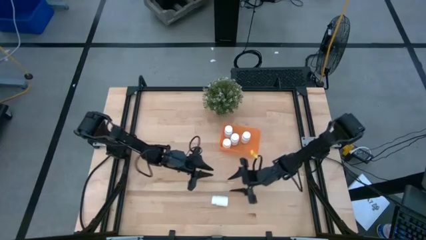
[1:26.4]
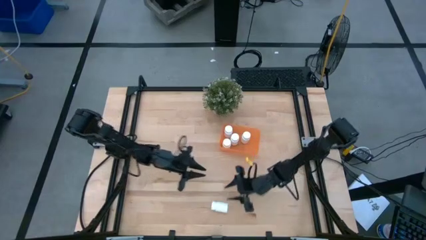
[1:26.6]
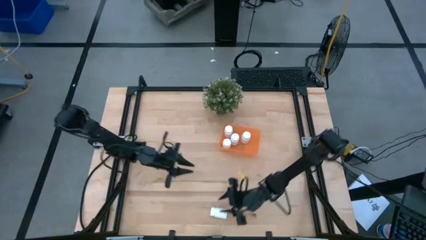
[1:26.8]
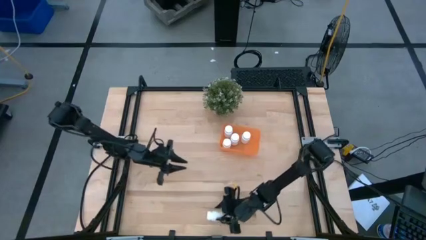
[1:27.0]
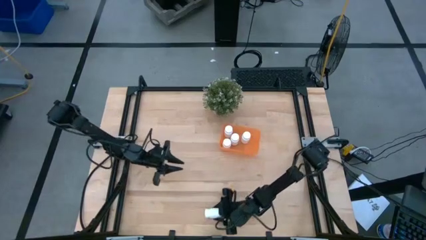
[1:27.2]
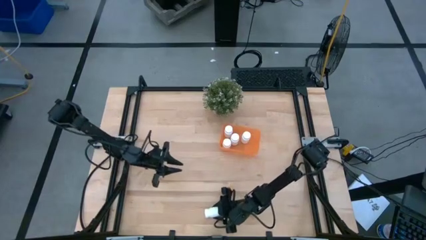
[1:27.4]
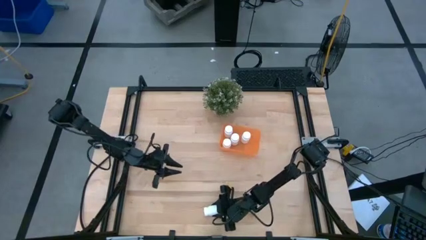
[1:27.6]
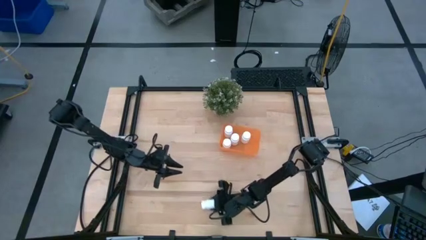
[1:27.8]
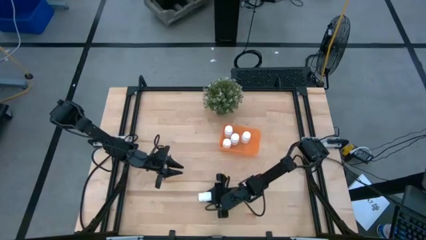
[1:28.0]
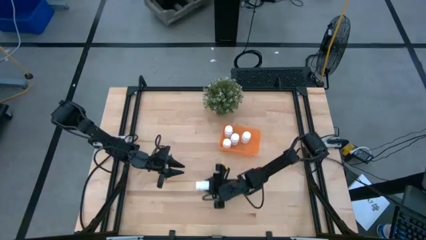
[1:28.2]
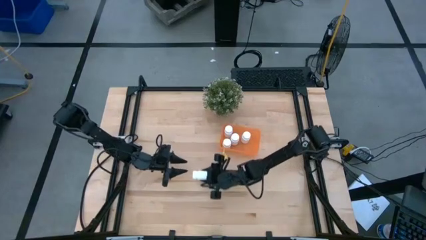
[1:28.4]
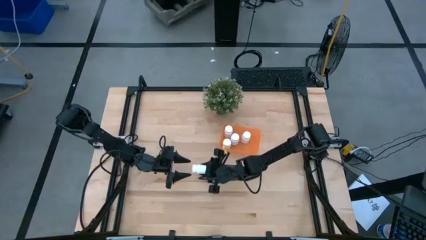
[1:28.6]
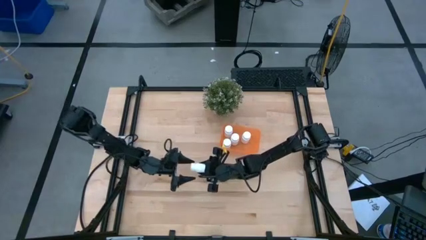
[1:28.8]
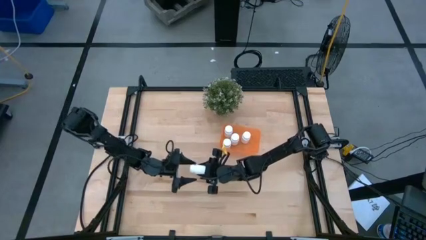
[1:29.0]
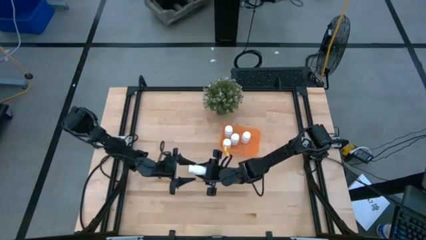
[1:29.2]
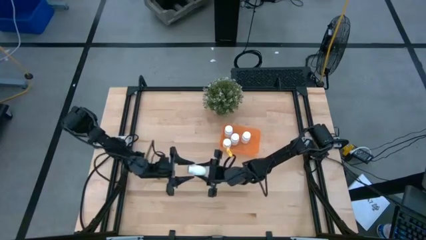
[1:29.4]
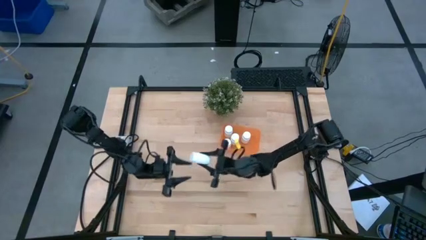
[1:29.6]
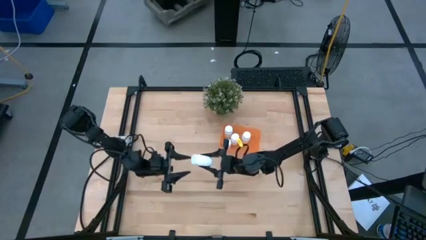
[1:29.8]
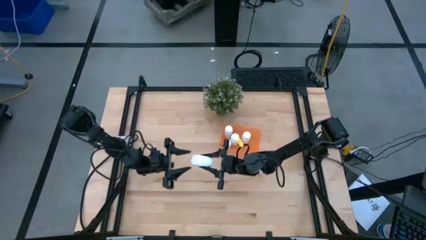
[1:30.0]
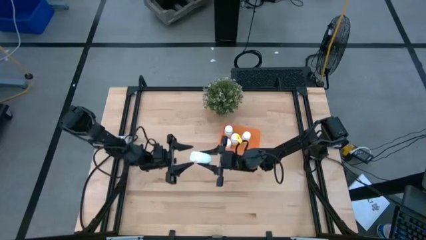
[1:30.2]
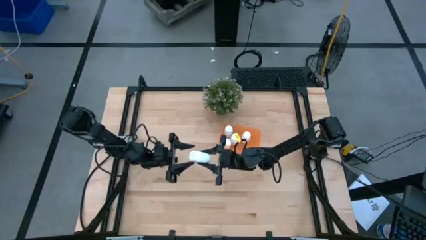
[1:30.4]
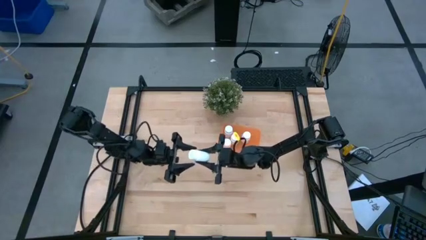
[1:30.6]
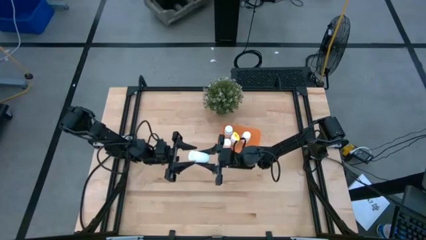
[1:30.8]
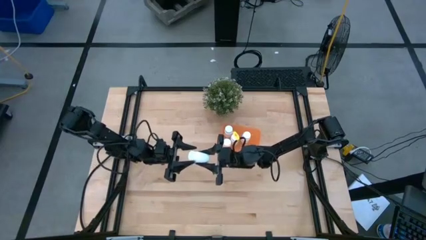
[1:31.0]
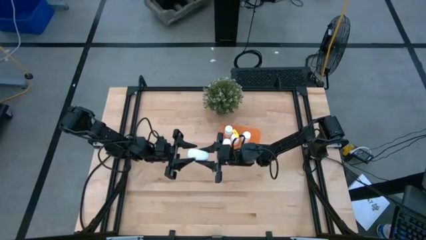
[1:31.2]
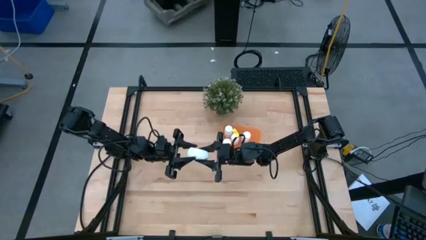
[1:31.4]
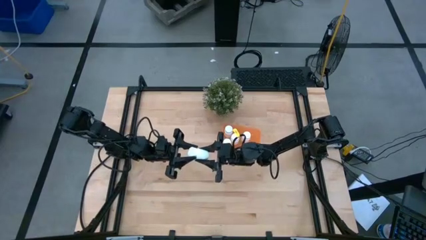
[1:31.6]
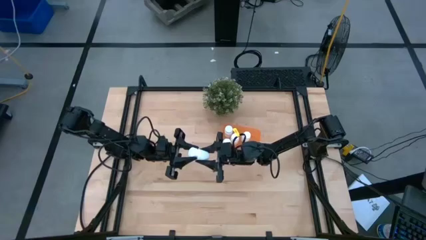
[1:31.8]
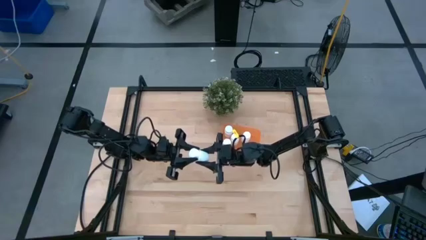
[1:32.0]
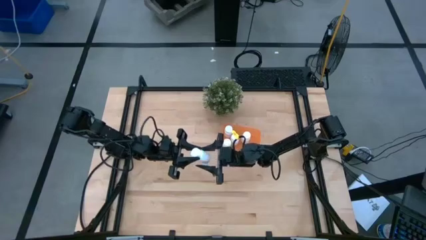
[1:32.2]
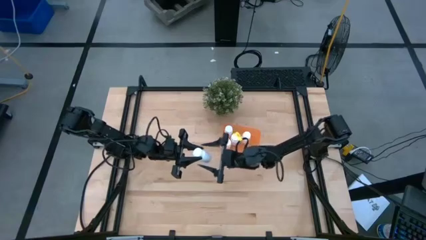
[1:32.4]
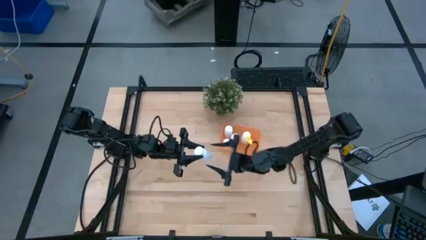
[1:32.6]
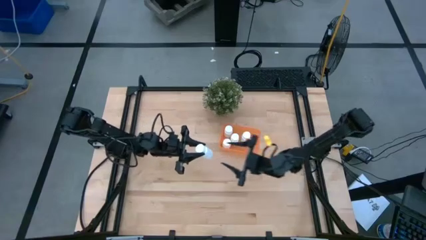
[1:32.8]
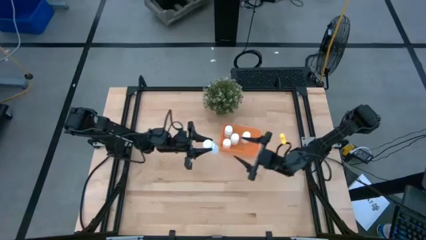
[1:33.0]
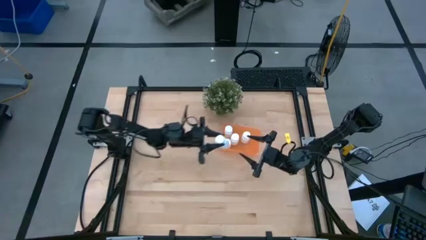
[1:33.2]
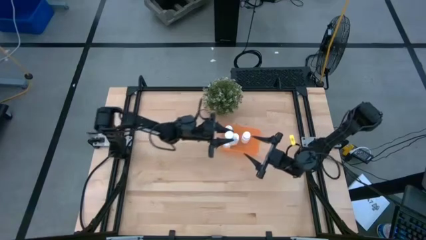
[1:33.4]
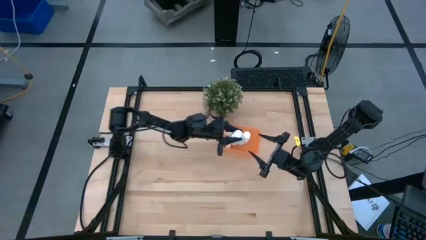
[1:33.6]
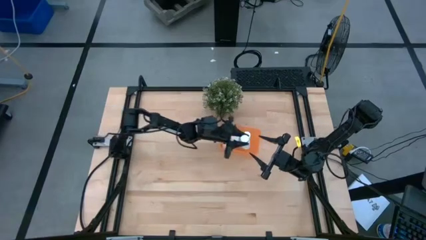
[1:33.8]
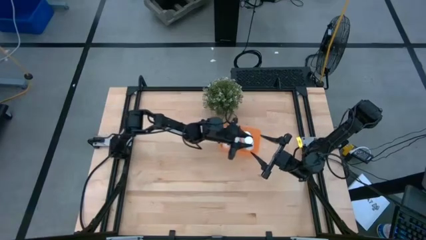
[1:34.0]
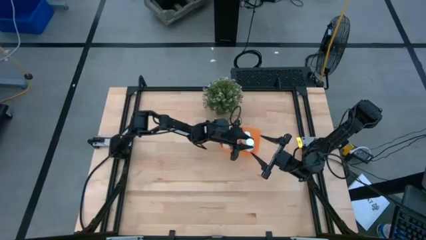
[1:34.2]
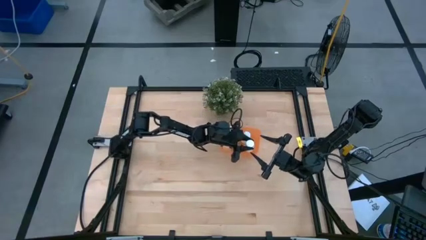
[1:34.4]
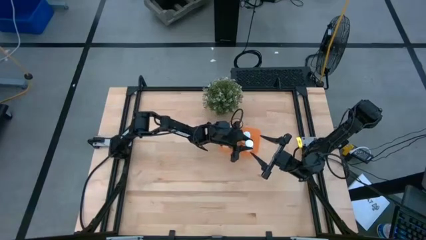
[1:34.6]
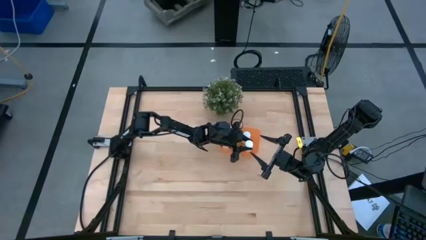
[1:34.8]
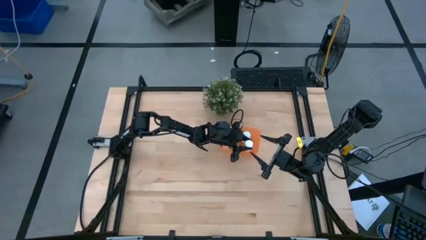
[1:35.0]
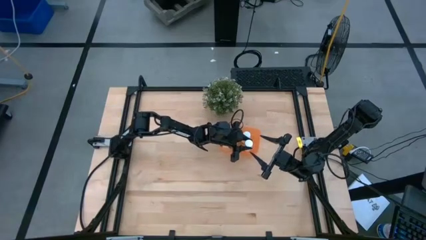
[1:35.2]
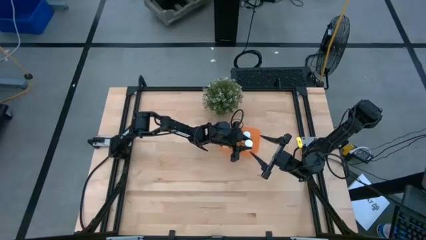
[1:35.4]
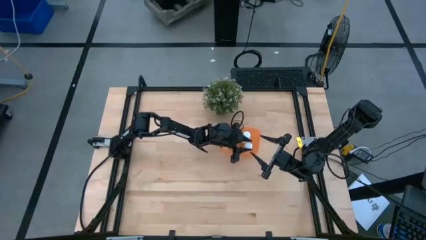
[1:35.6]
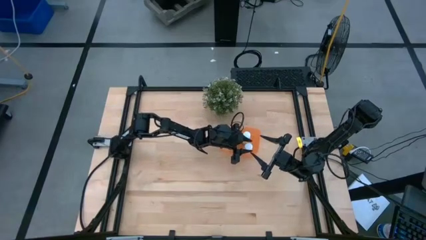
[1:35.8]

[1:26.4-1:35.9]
Task: Pick and place pill bottles into a basket
Put the white pill bottle into the orange bin

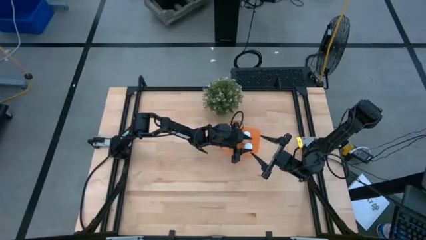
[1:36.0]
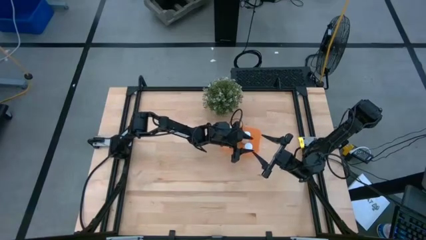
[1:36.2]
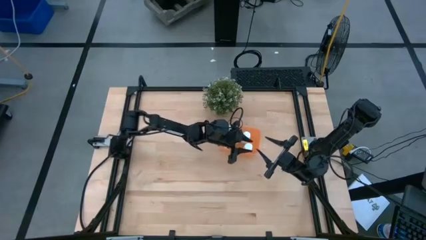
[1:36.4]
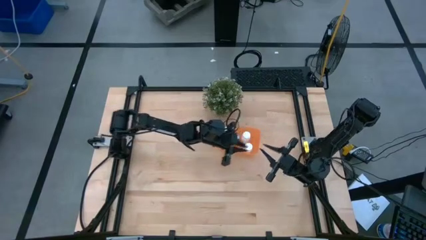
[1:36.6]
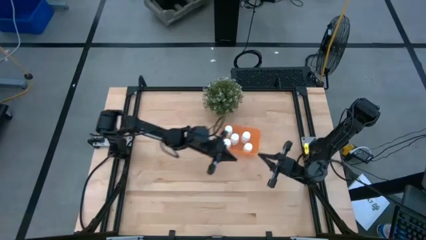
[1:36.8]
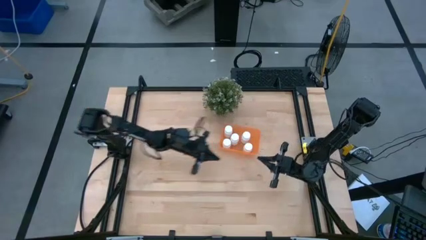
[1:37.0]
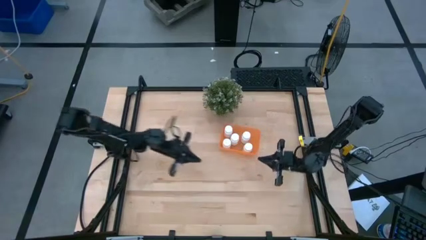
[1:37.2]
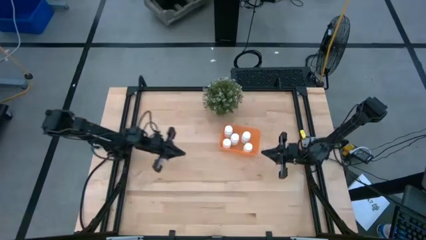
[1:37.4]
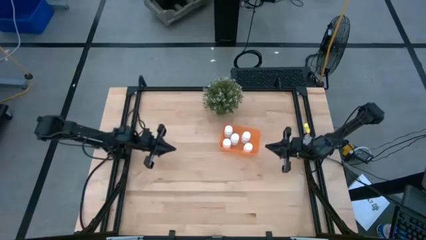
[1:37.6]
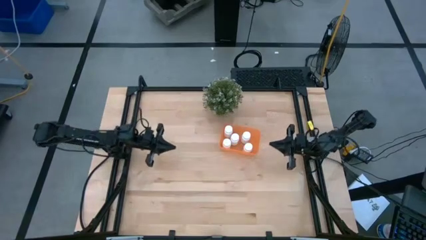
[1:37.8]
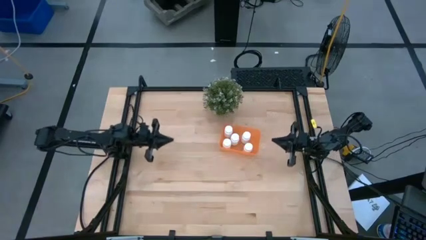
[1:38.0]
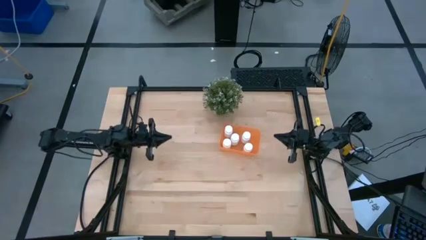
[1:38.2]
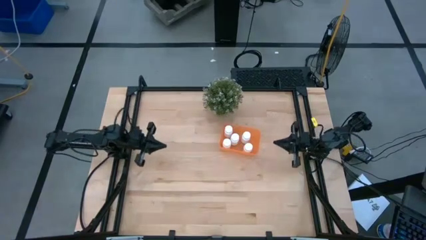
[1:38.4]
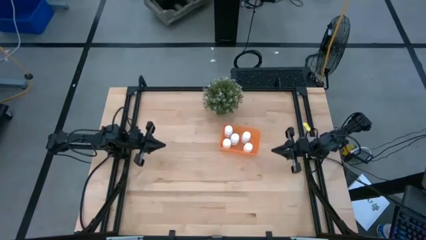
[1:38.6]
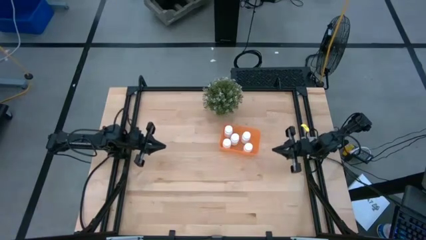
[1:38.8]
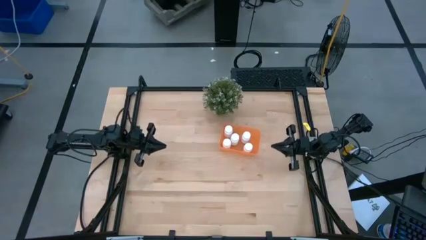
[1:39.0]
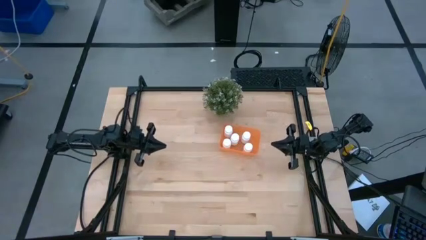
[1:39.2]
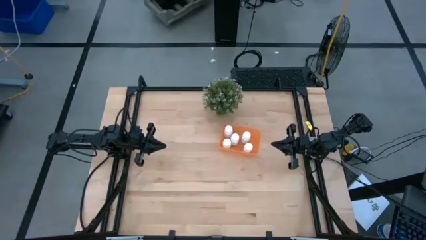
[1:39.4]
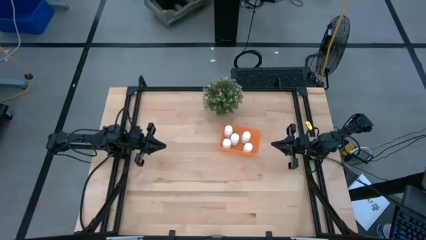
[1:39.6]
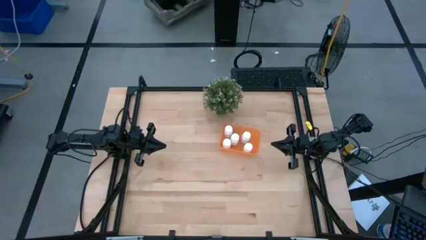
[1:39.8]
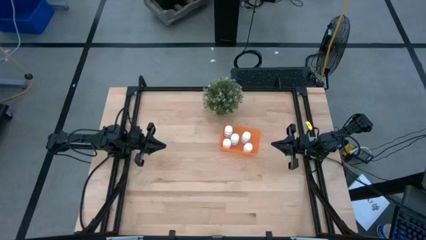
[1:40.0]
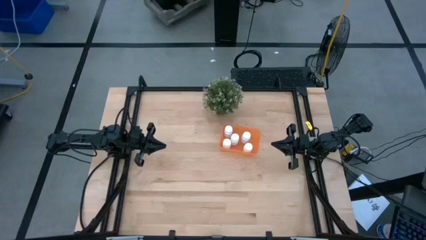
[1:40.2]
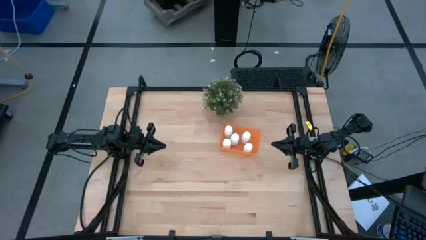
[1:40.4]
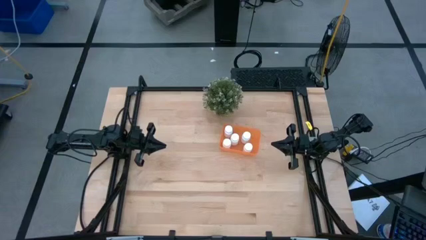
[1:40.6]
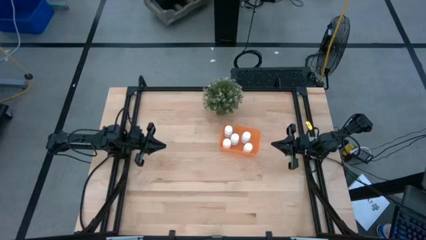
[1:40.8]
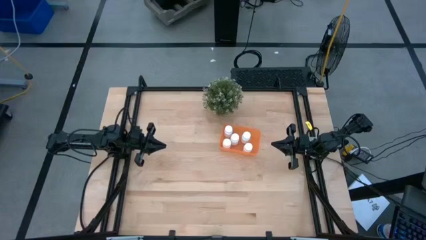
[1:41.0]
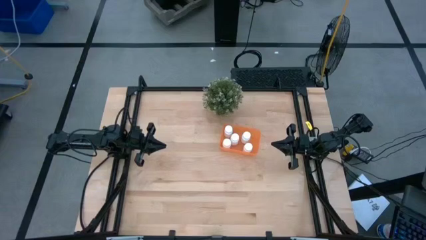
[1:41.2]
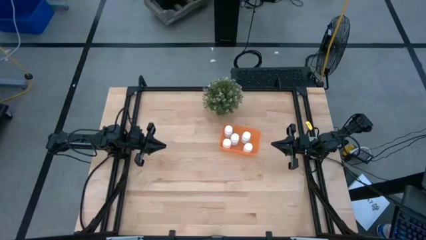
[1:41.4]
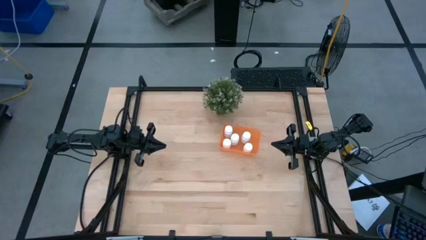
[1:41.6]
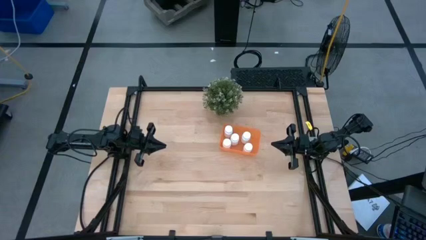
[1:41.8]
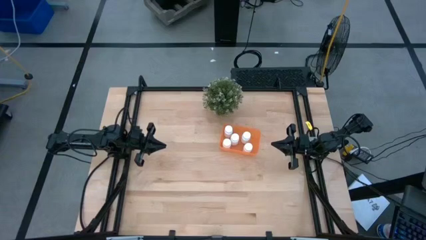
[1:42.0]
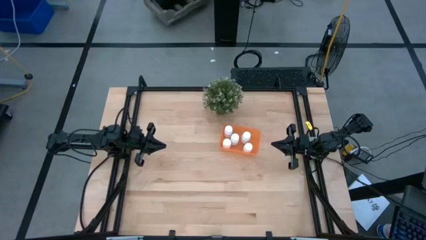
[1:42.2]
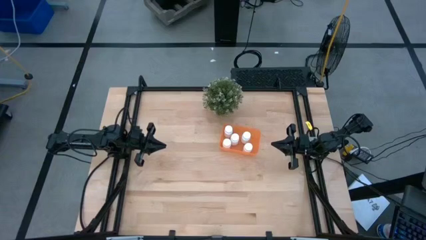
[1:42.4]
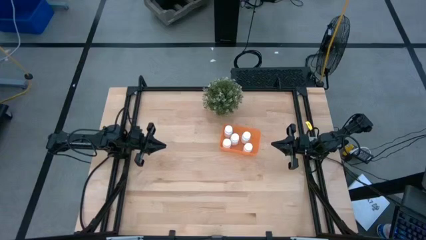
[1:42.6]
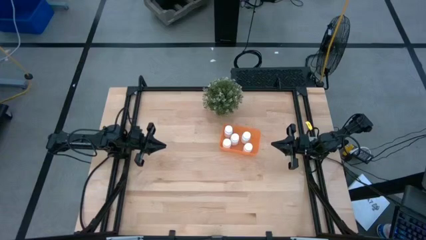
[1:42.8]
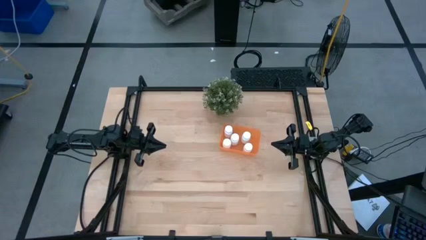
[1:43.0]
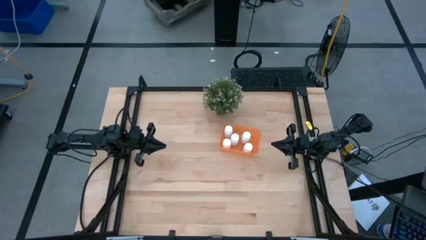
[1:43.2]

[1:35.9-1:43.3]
Return to Home Position
